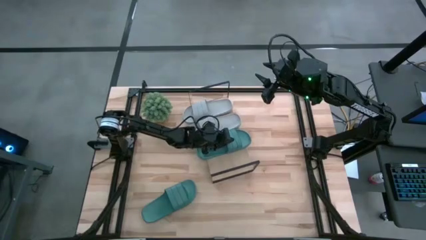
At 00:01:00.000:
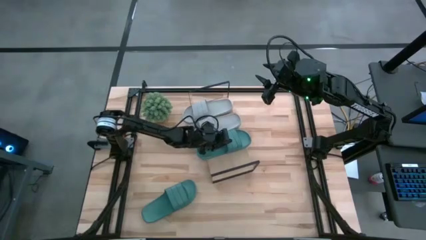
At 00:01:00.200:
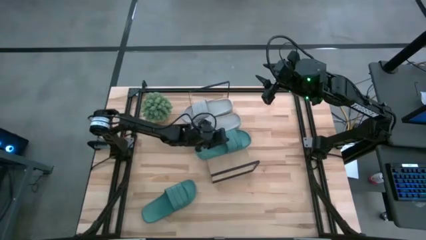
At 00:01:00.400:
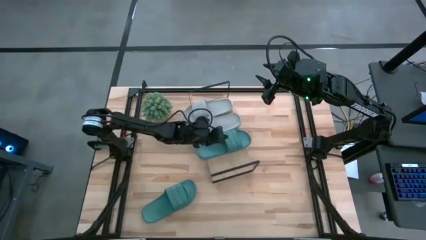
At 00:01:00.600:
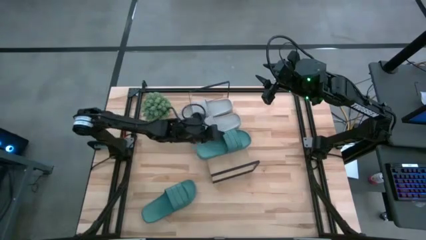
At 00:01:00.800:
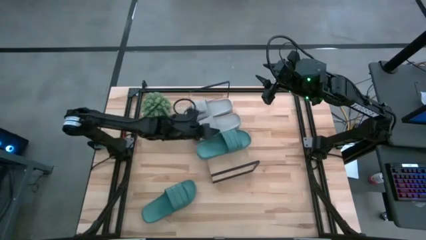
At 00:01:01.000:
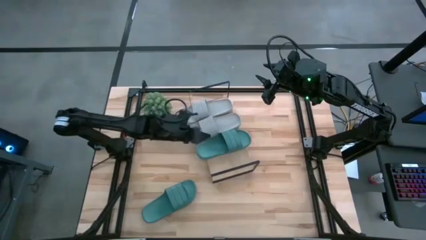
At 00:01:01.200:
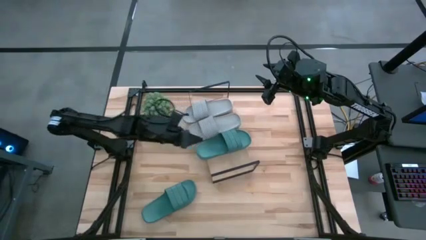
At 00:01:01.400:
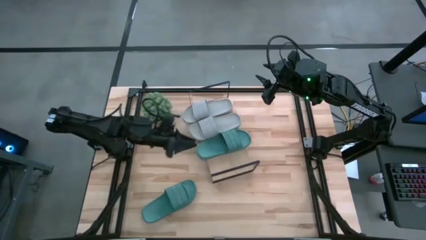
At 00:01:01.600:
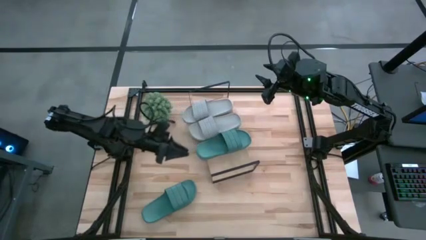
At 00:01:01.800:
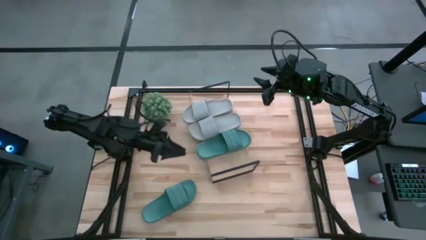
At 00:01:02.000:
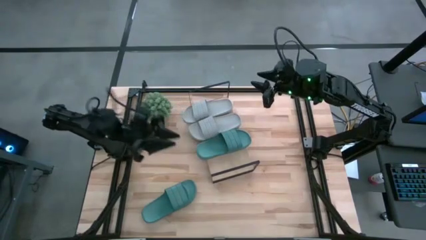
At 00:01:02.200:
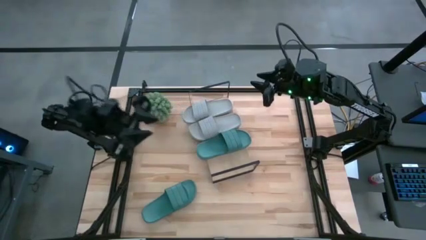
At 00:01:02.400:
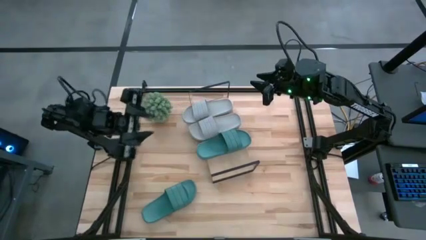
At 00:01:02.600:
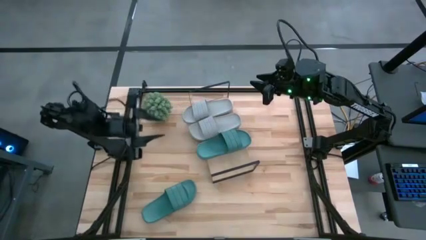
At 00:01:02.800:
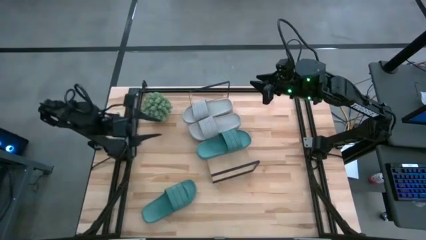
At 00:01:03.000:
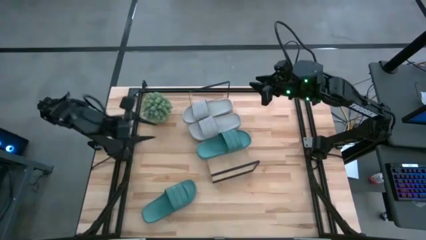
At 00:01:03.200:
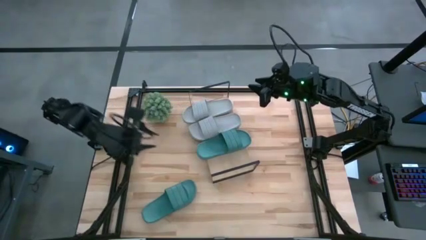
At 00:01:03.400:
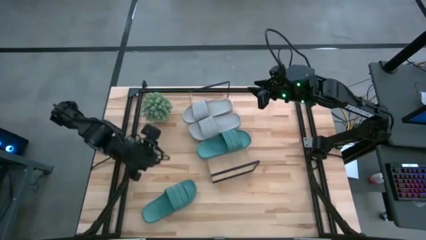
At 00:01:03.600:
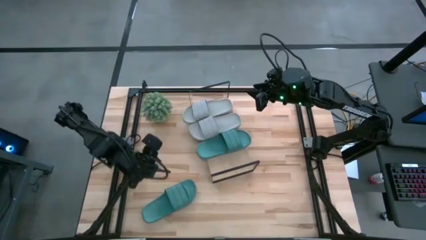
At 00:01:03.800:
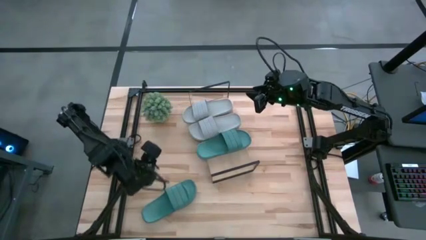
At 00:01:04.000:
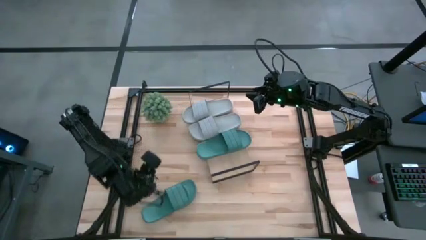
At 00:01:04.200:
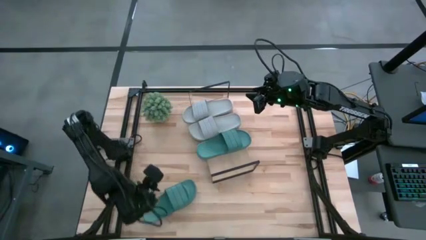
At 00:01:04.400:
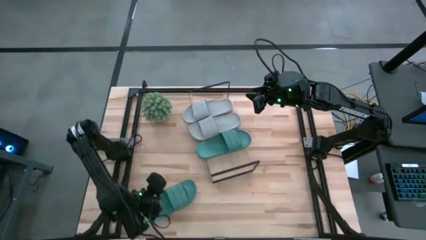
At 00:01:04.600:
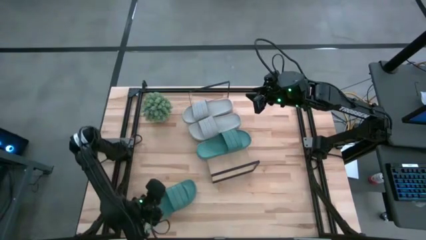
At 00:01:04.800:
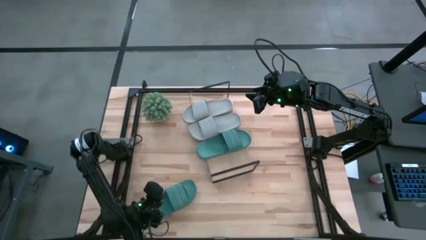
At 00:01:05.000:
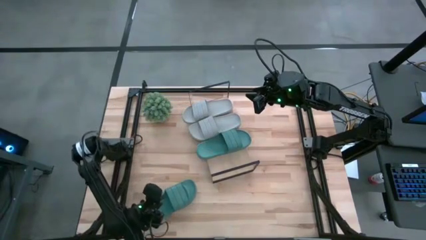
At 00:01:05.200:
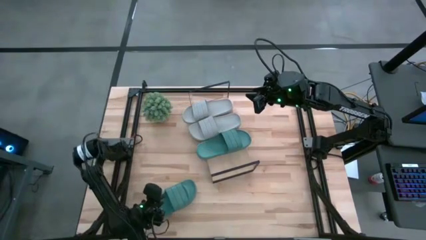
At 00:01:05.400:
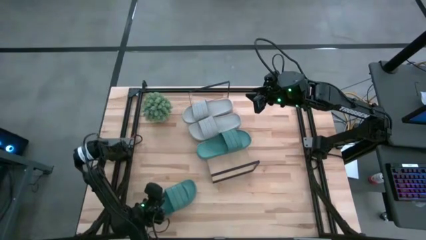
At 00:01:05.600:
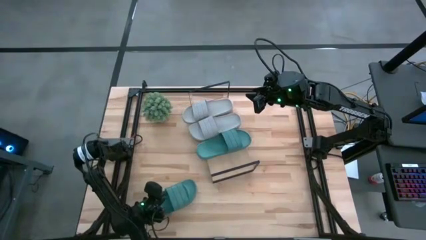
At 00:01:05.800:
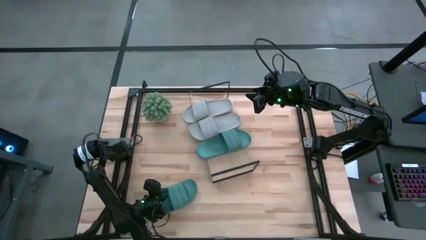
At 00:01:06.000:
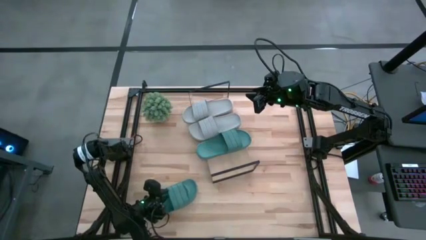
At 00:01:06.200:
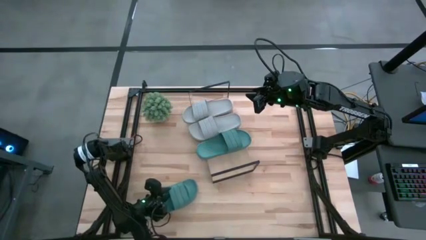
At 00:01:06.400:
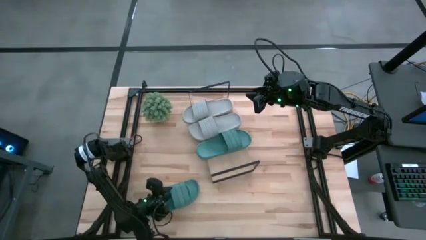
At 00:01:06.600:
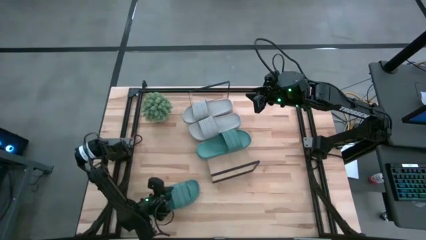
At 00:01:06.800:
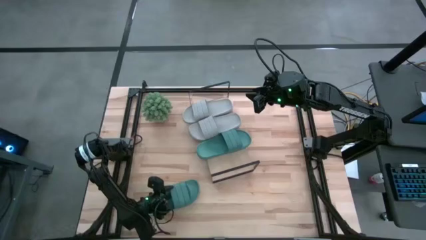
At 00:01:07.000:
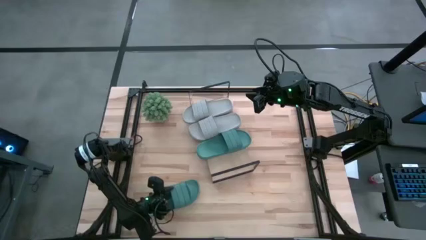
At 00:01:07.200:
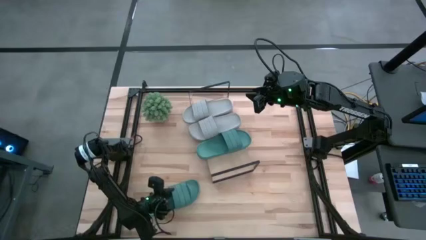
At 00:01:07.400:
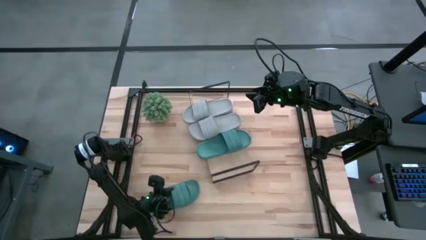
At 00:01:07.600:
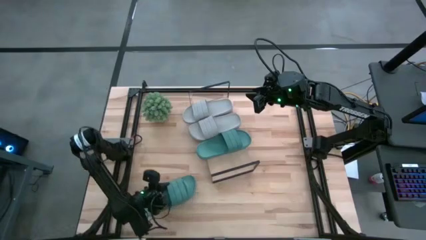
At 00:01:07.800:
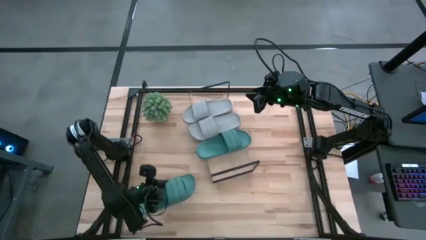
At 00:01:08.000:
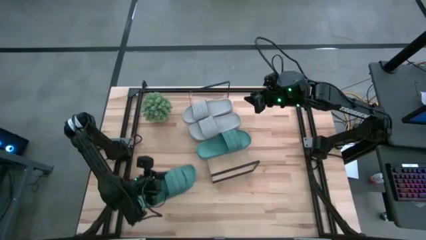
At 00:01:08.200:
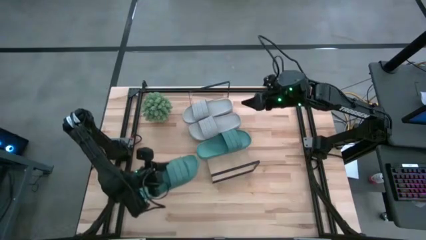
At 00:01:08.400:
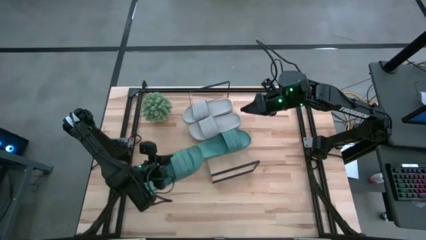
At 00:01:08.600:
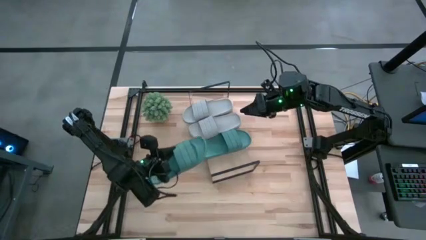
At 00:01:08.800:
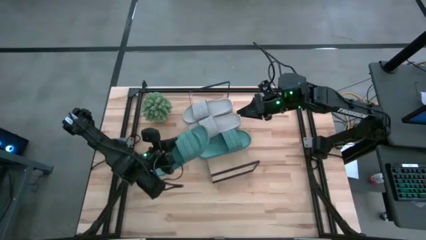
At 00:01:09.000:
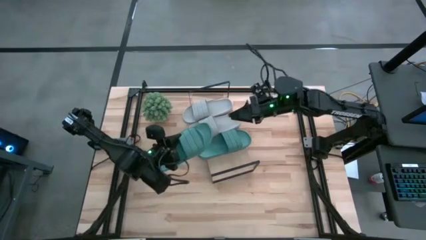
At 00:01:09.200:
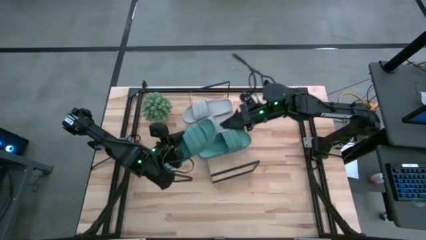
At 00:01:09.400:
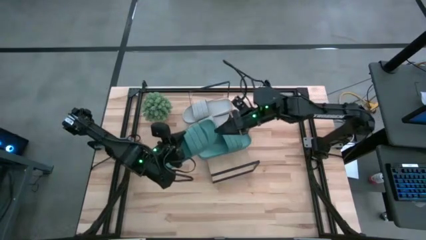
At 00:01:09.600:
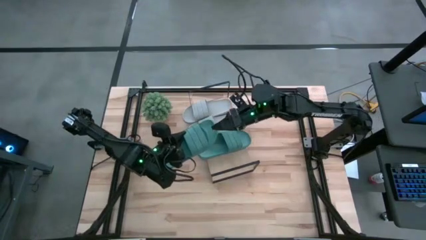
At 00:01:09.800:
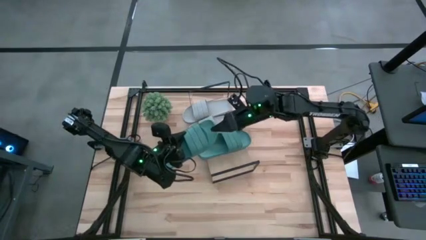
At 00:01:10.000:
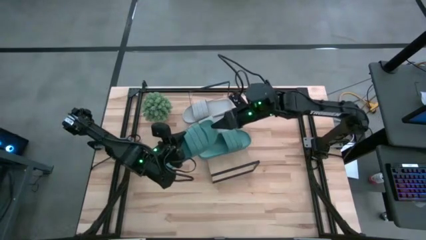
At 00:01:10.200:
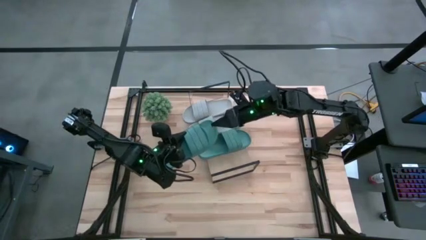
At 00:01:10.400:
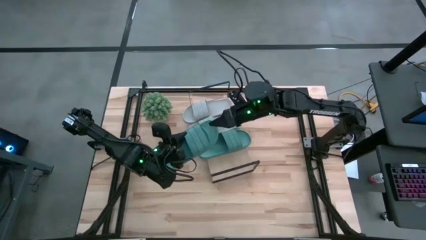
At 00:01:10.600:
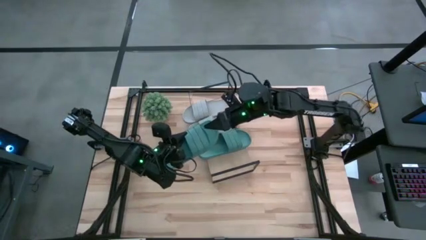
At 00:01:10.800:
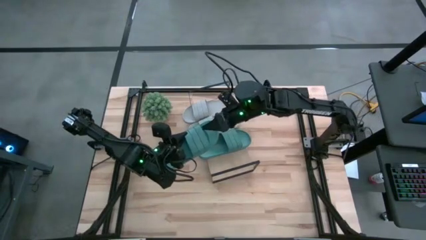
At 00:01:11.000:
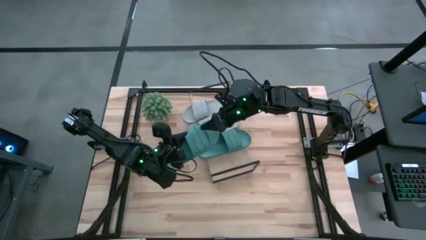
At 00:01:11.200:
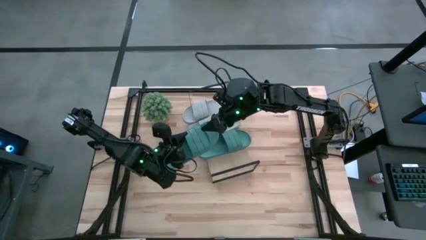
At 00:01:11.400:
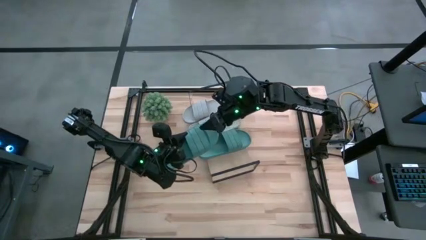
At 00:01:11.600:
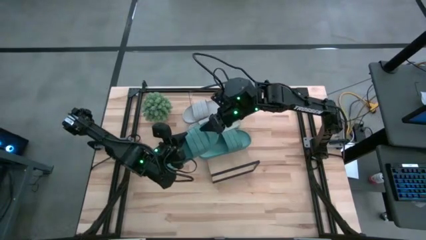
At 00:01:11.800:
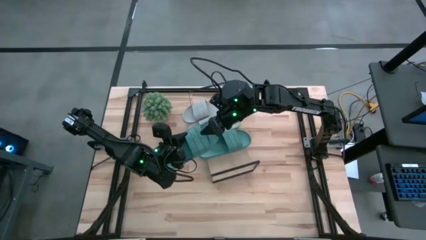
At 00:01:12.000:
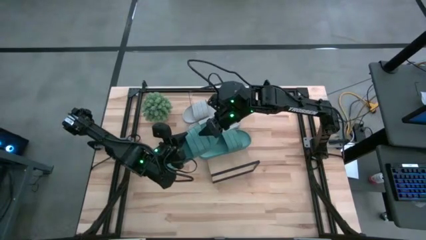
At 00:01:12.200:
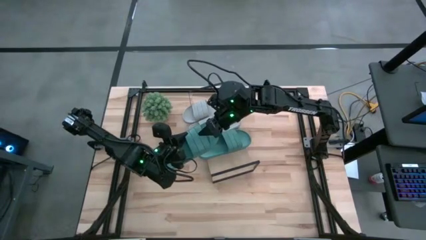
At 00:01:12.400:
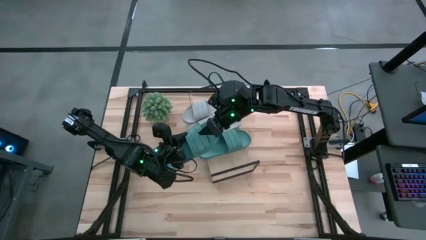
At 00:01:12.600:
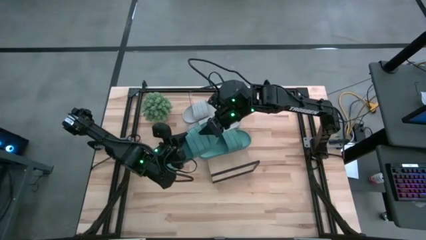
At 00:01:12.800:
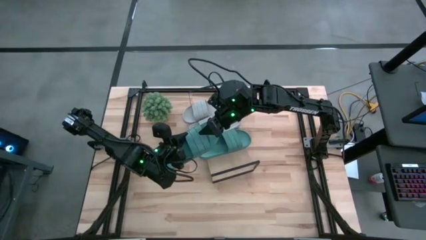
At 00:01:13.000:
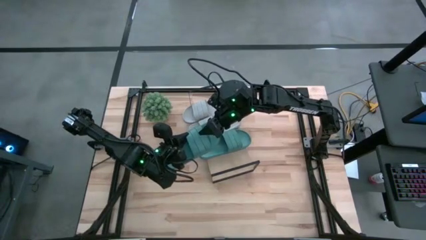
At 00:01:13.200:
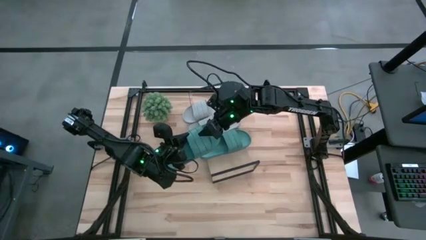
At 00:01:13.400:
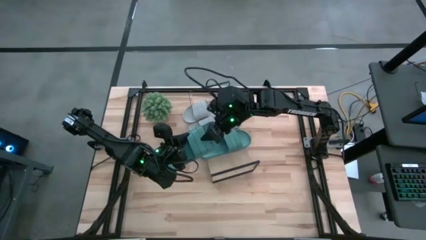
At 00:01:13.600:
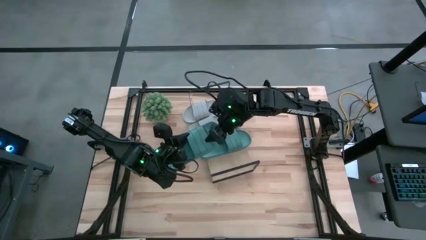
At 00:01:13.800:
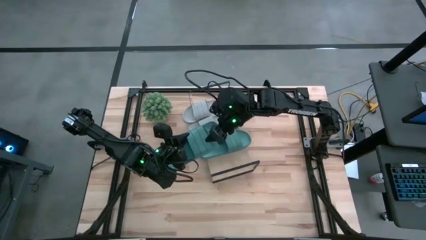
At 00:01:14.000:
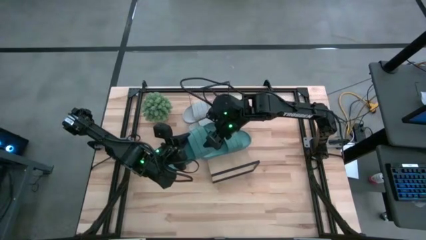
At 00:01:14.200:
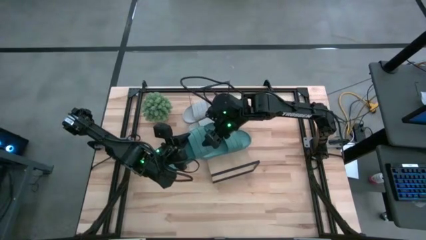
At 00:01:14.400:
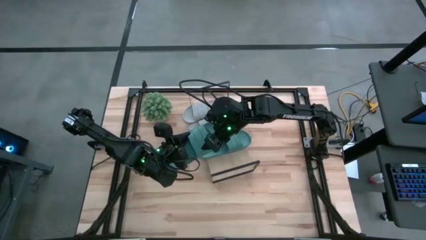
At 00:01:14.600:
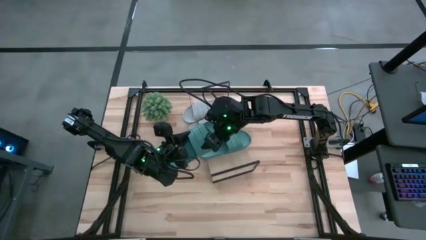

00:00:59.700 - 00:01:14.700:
Task: Pick and place slides into the shelf
Put the green slipper on the shelf
